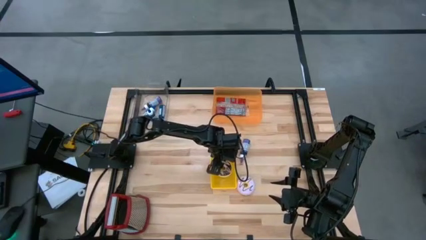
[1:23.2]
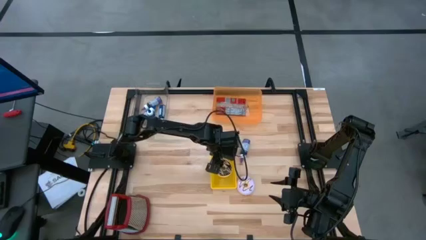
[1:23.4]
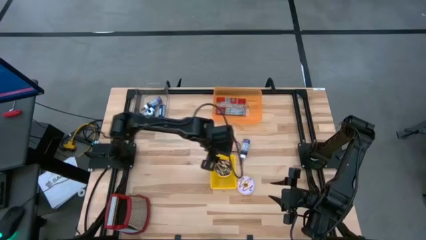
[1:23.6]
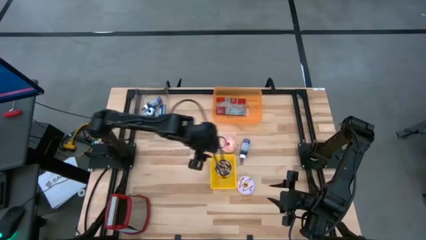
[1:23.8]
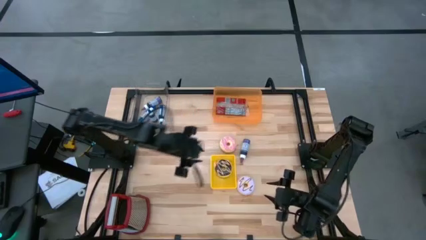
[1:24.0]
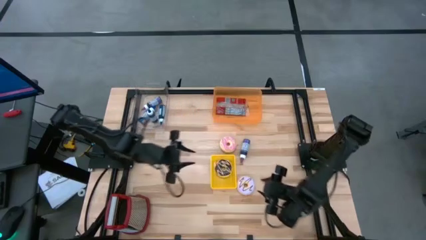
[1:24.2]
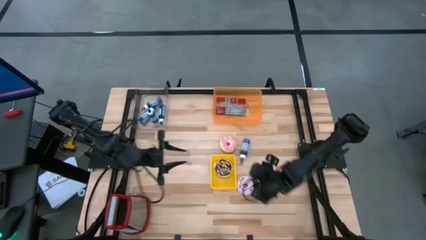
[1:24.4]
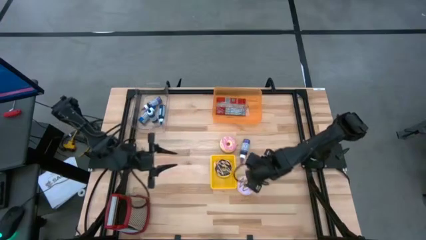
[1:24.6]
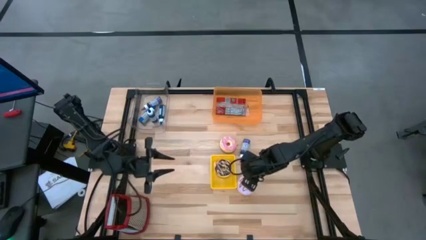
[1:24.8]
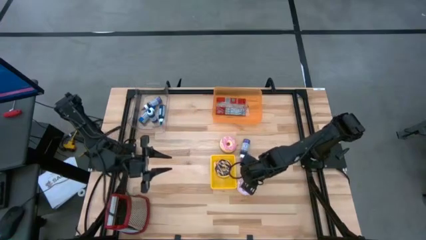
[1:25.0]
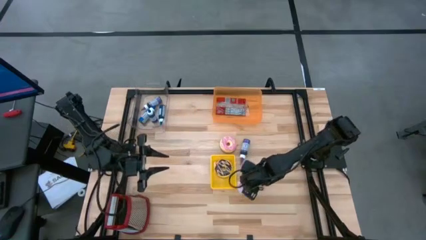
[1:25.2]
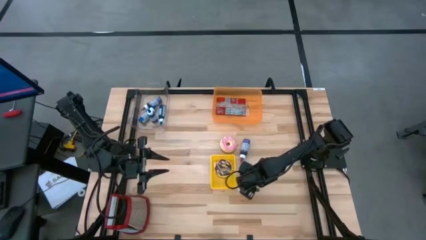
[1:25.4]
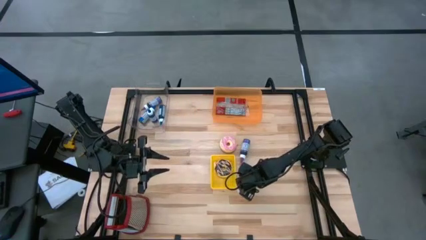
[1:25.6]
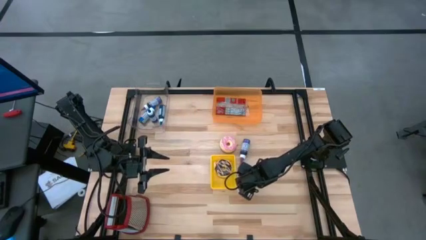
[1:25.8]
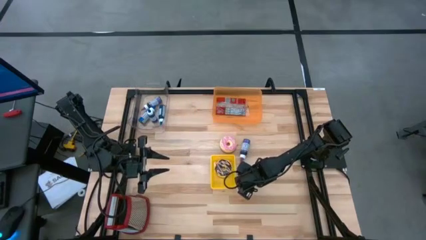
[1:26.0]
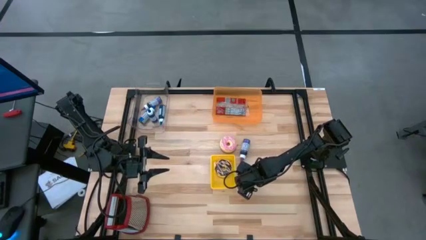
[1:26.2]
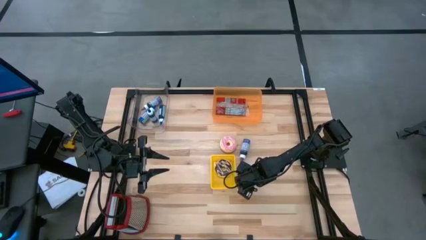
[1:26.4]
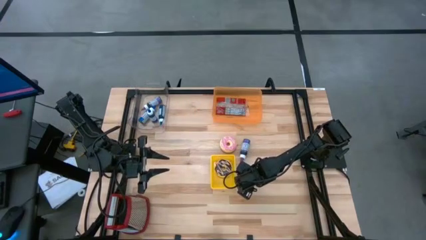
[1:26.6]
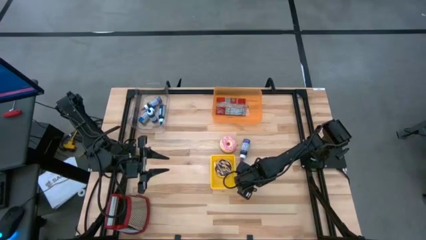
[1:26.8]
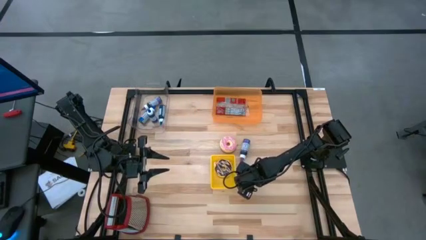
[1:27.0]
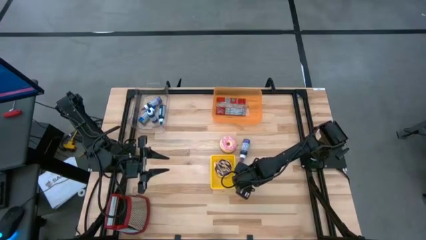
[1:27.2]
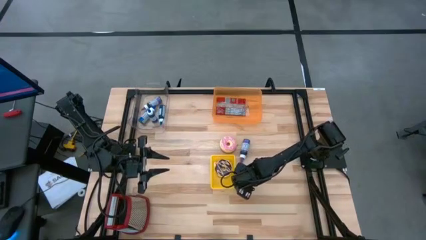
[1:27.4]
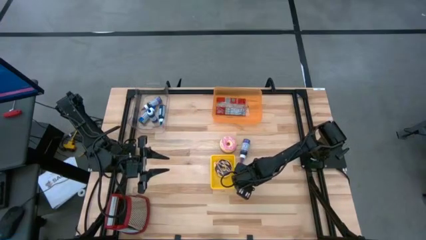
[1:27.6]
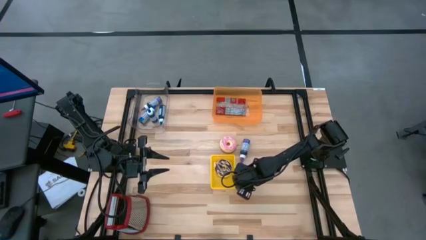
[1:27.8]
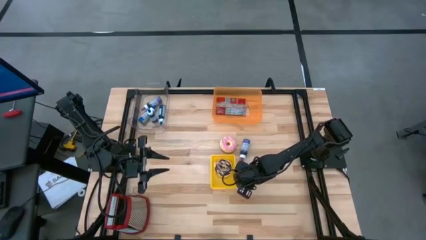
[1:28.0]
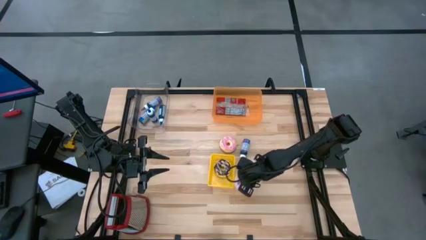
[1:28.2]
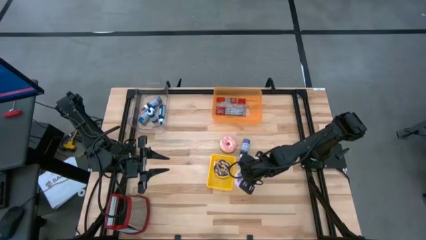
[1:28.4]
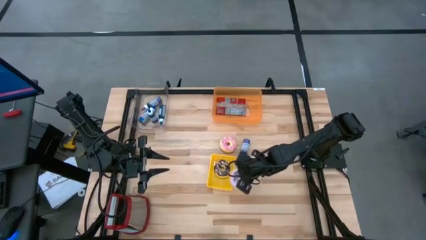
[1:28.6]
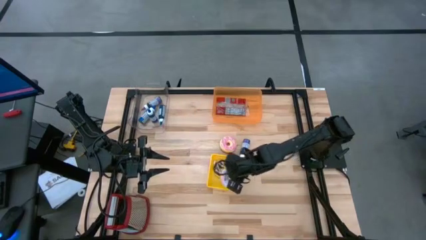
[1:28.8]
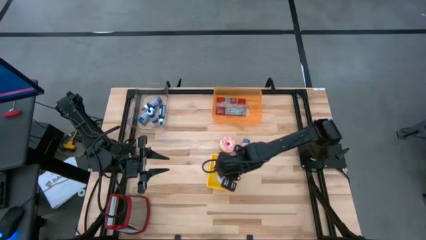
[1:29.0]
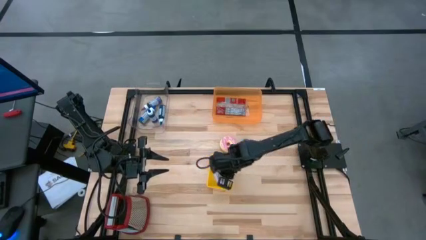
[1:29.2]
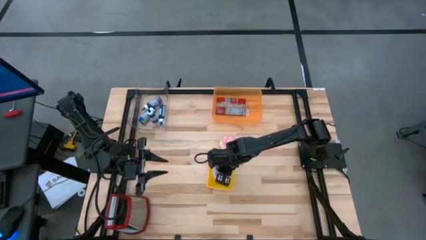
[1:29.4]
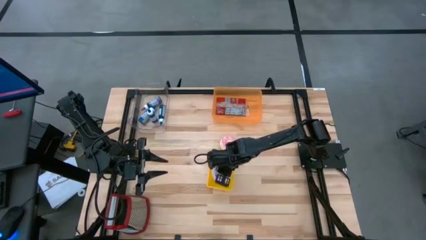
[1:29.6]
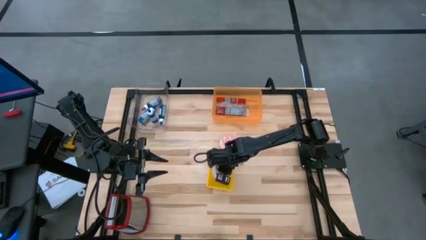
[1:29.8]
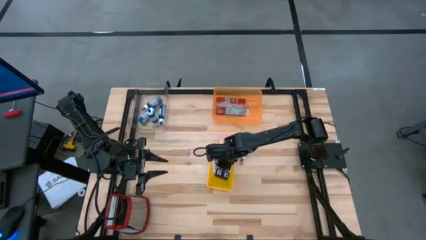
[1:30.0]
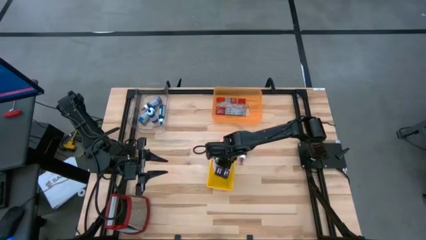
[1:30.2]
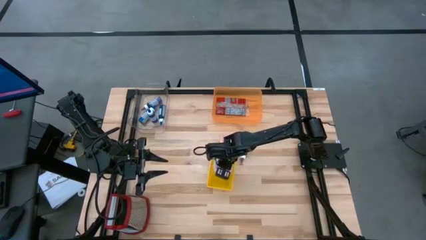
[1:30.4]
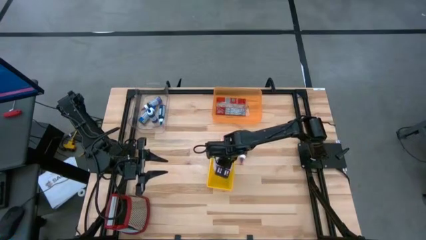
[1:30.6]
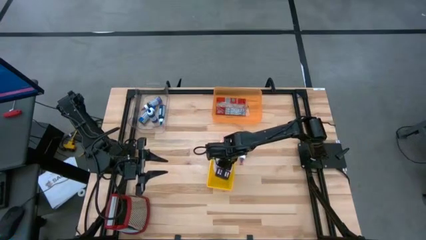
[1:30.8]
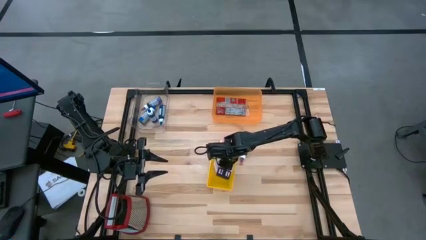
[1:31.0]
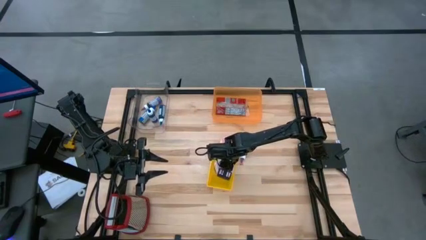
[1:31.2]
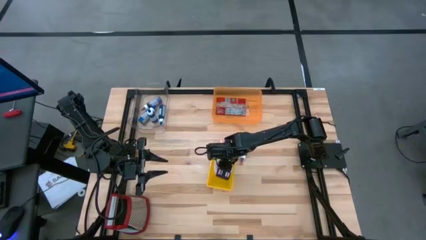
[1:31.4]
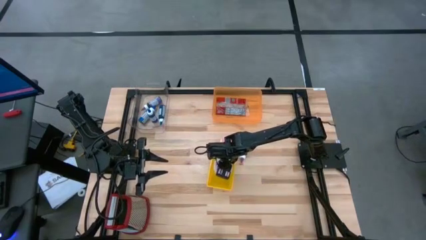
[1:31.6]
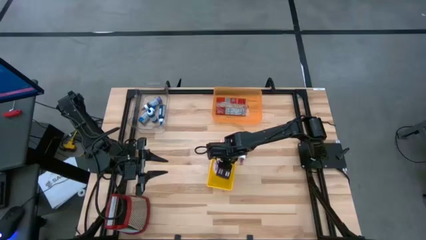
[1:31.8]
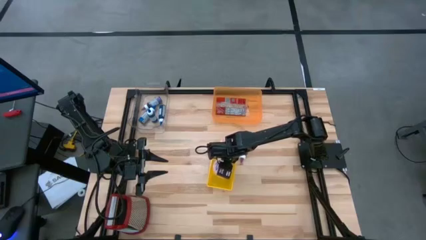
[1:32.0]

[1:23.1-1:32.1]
Put the purple donut into the yellow bin

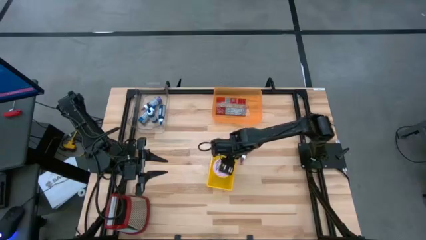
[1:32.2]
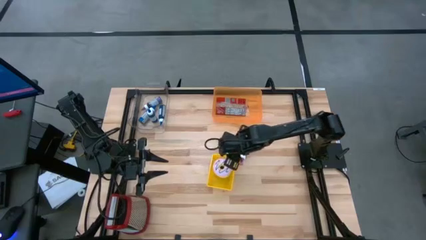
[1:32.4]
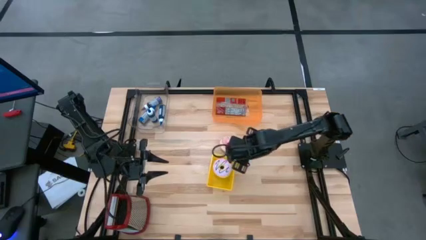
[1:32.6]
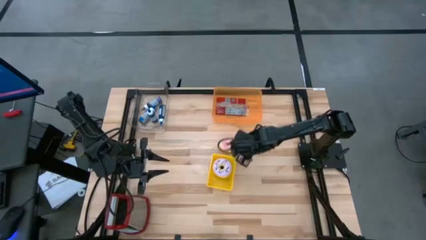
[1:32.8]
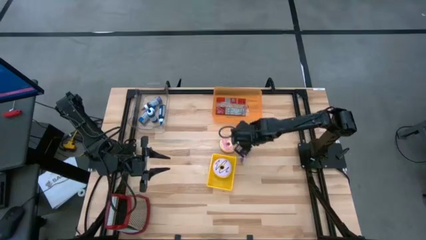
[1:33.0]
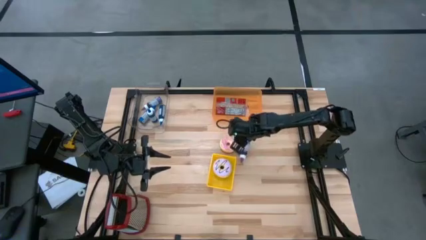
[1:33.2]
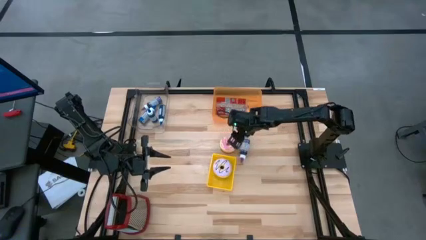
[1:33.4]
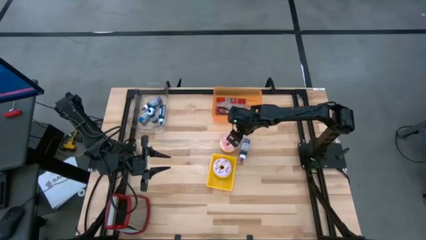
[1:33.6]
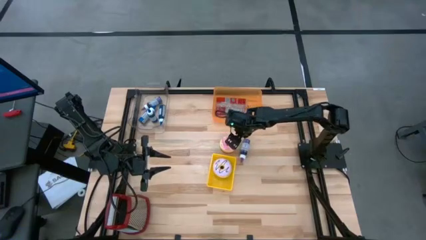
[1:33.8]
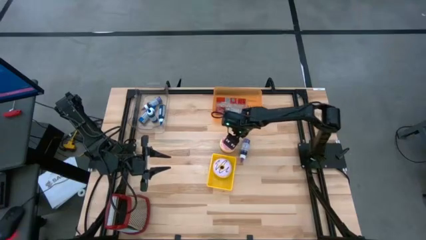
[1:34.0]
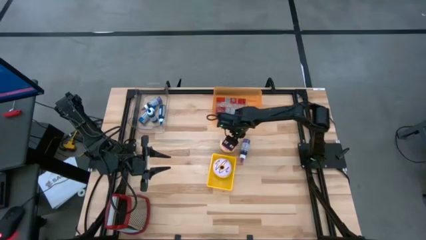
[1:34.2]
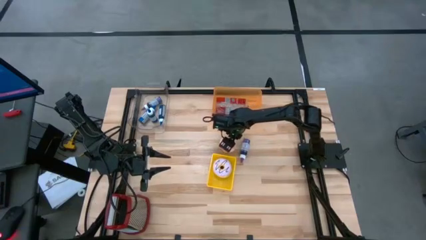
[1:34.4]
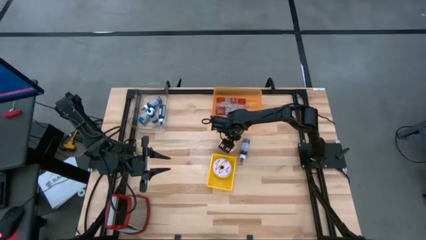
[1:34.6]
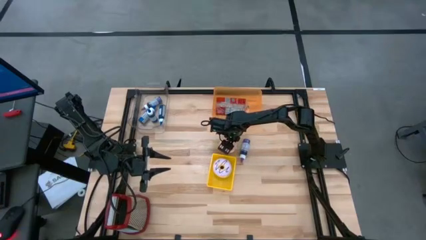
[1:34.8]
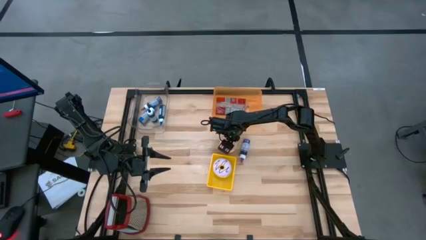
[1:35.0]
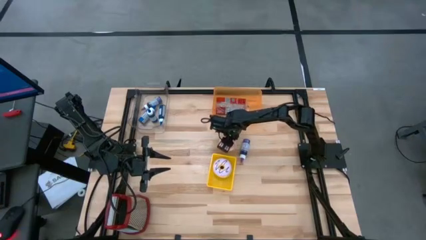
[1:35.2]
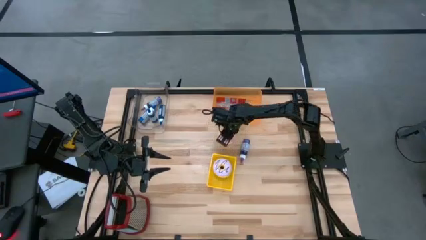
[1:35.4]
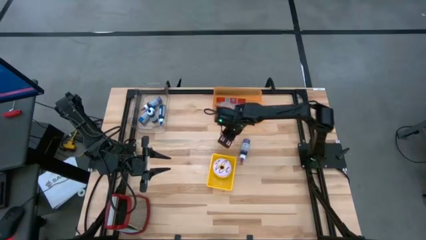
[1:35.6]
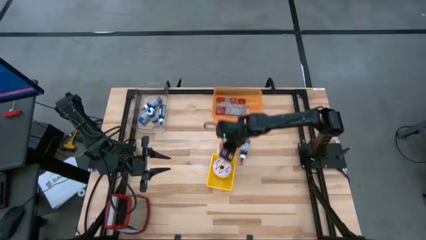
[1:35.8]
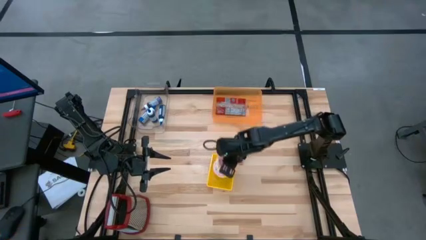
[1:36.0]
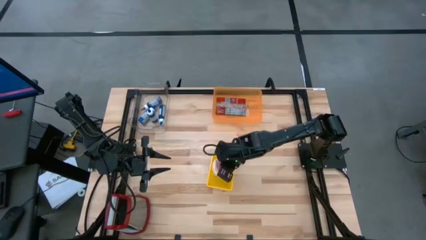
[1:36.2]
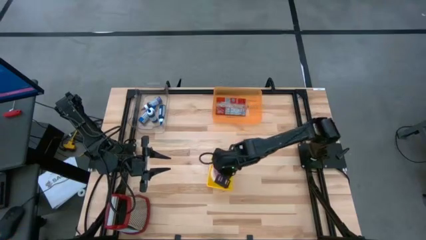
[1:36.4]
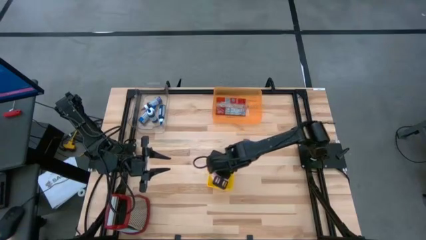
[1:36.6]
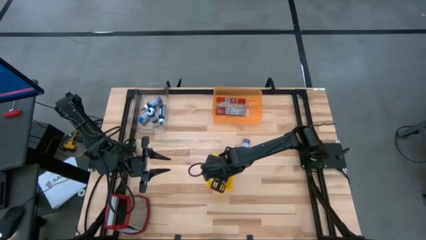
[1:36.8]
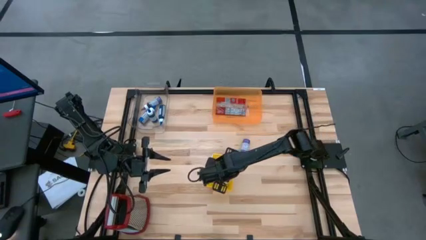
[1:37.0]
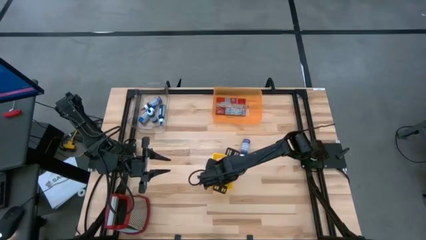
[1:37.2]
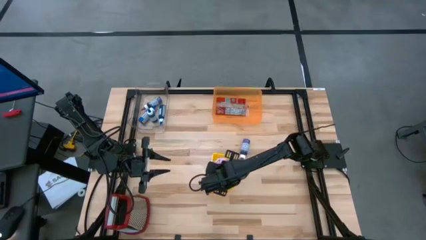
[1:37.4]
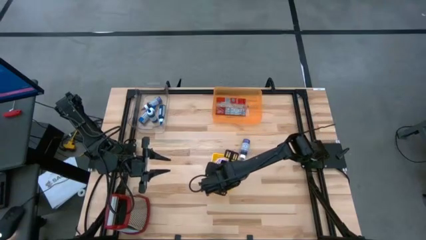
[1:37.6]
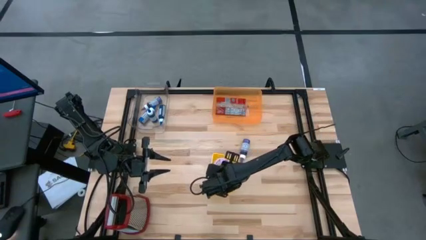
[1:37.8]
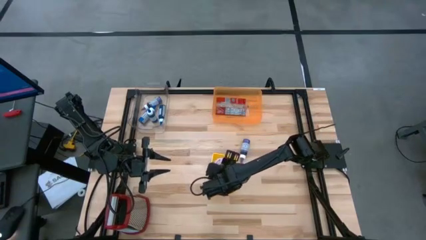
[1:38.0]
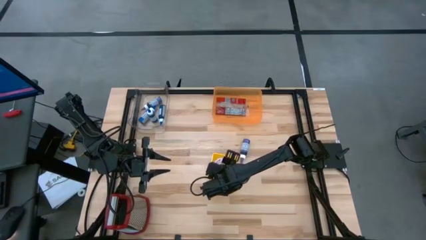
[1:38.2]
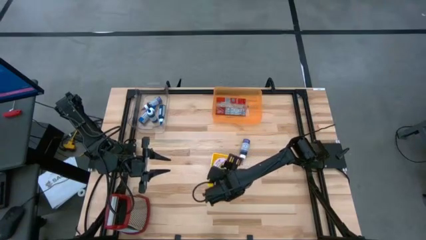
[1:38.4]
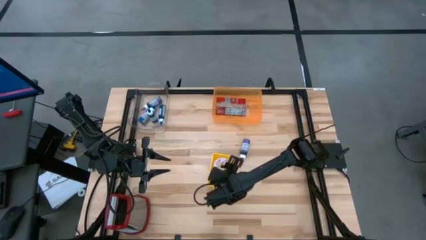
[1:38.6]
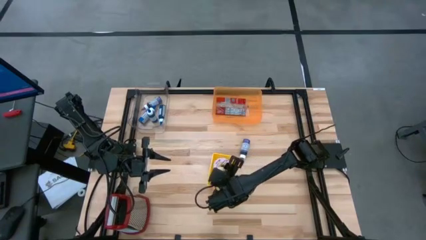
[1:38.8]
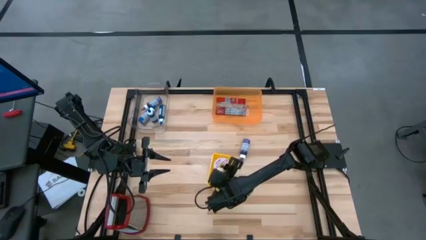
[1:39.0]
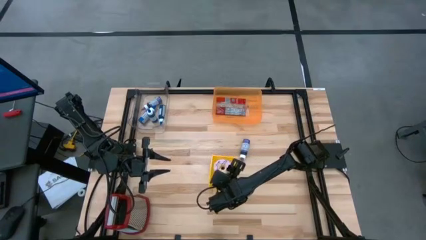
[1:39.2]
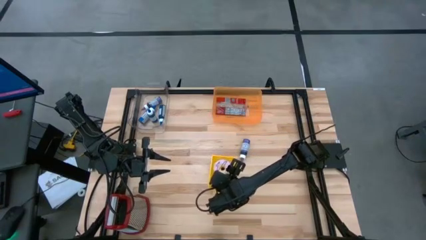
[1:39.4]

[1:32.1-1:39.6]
Put the pink donut into the yellow bin
